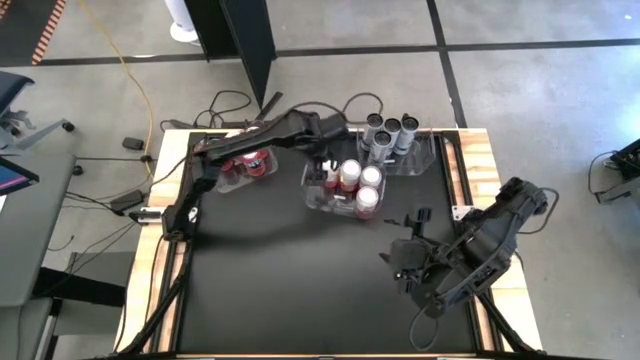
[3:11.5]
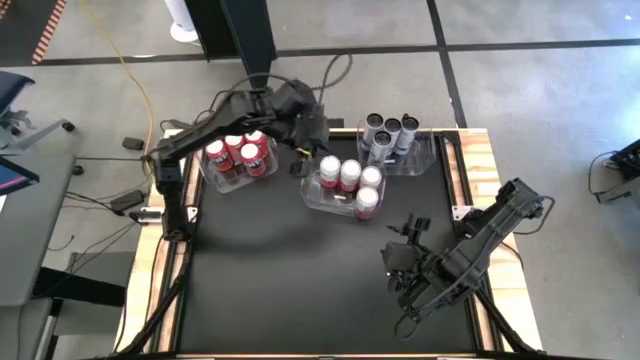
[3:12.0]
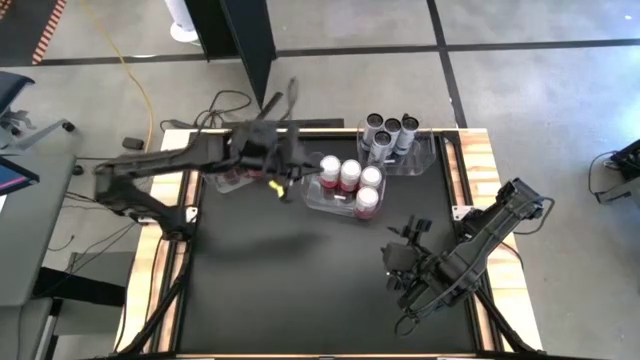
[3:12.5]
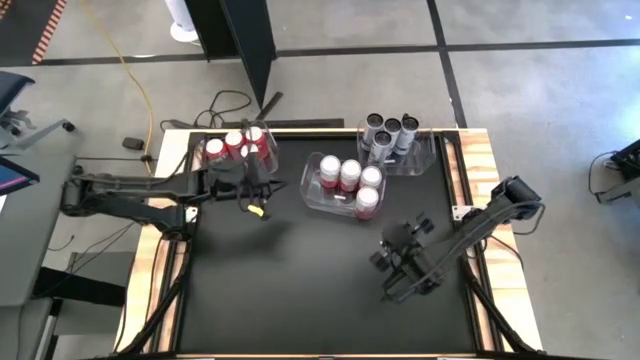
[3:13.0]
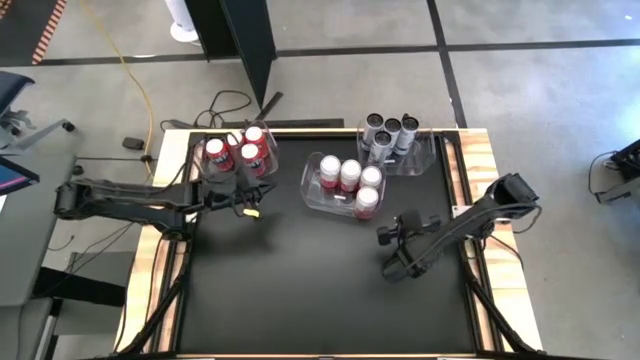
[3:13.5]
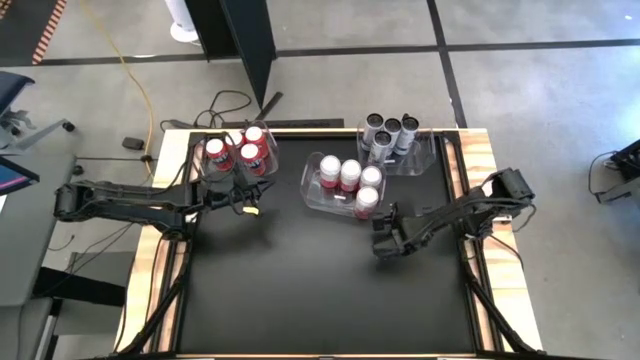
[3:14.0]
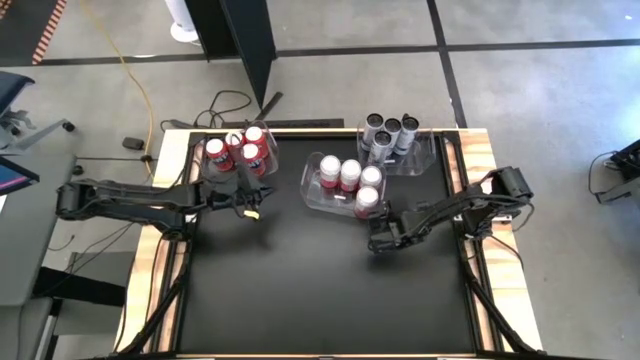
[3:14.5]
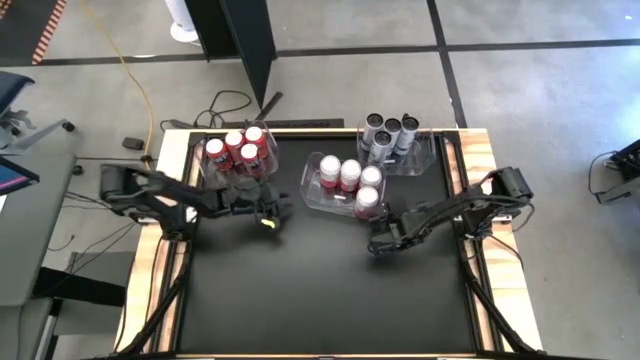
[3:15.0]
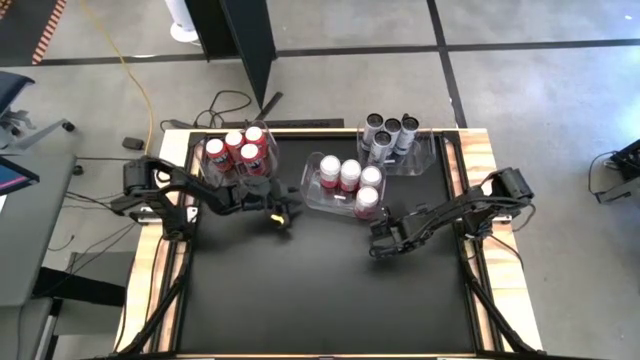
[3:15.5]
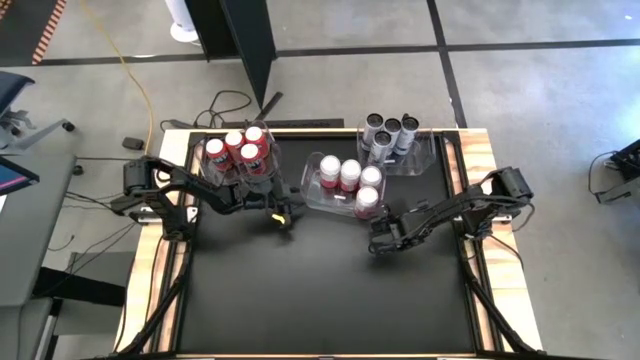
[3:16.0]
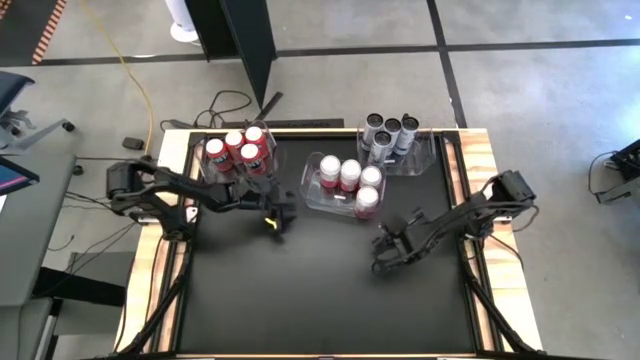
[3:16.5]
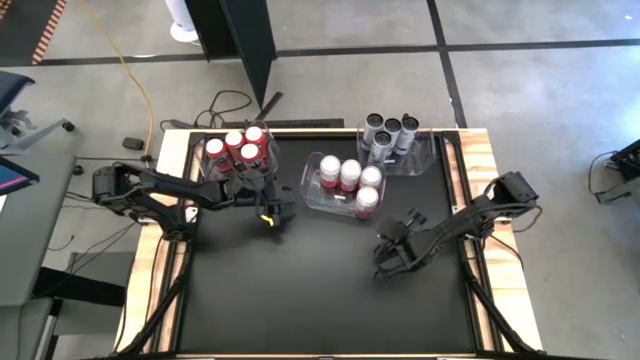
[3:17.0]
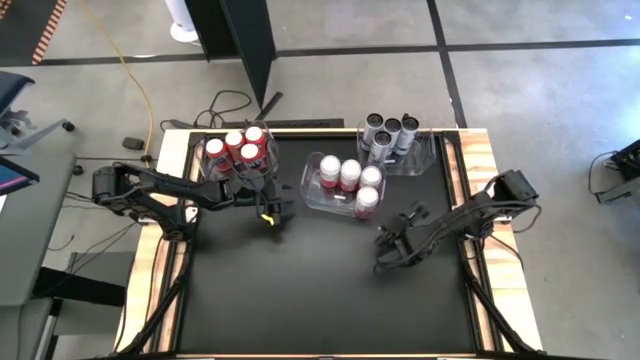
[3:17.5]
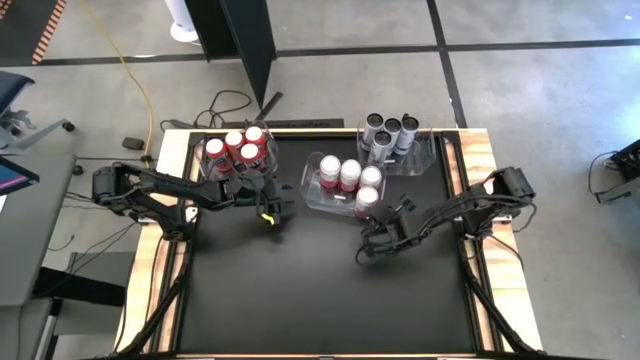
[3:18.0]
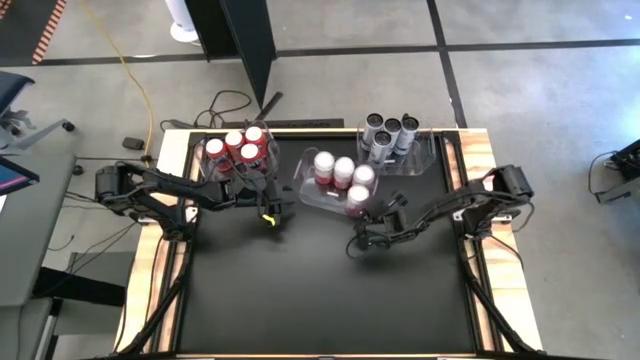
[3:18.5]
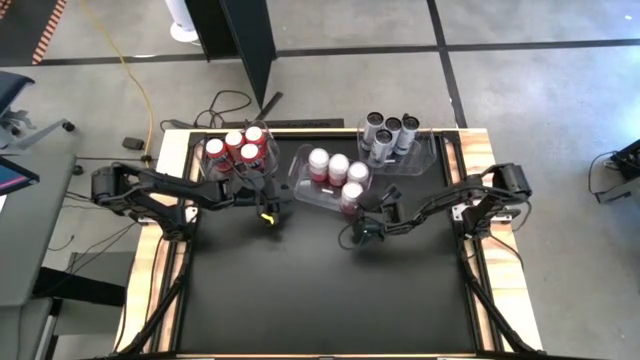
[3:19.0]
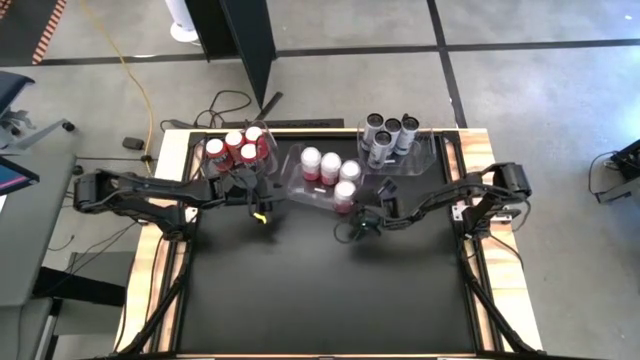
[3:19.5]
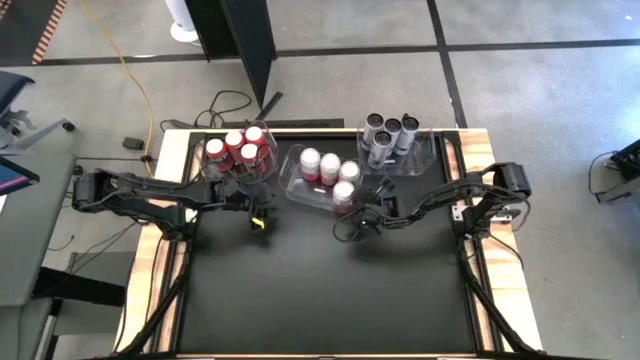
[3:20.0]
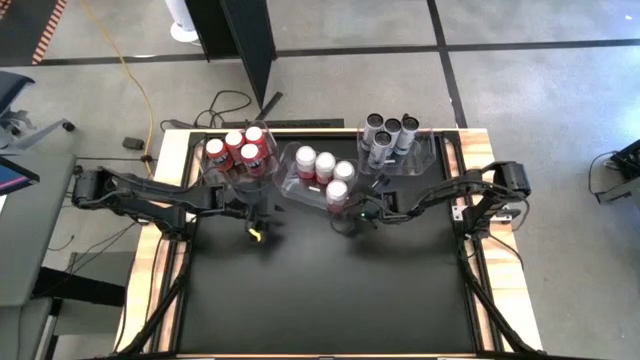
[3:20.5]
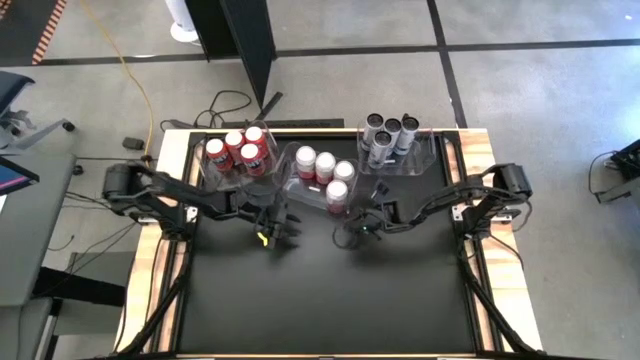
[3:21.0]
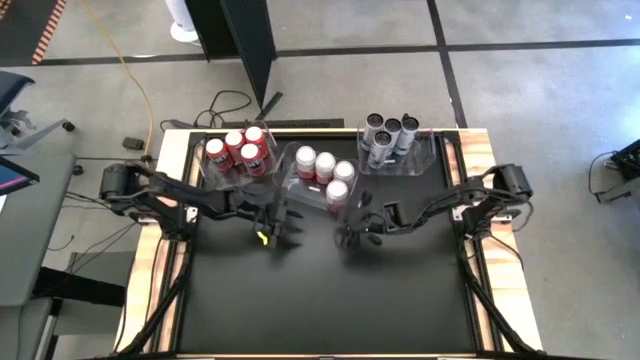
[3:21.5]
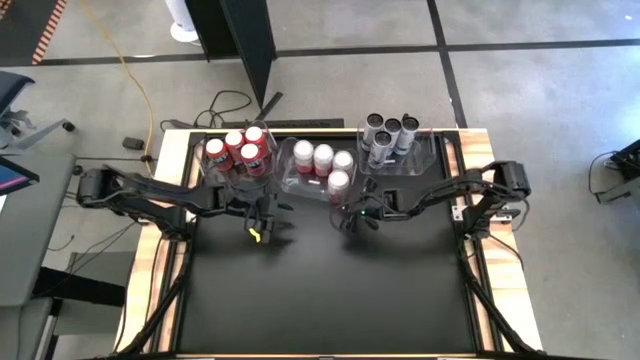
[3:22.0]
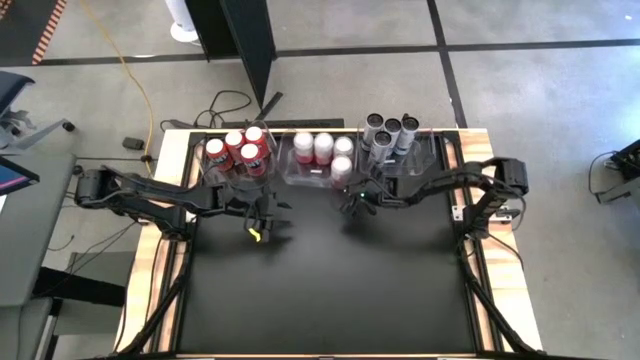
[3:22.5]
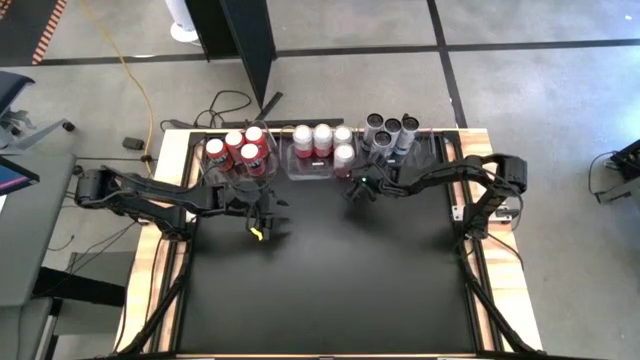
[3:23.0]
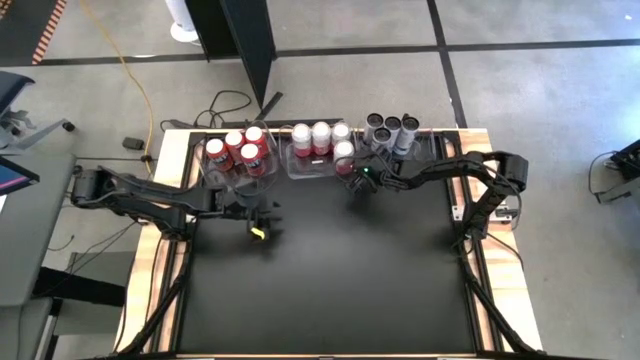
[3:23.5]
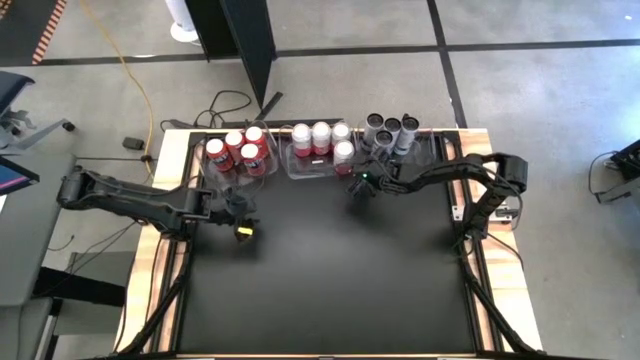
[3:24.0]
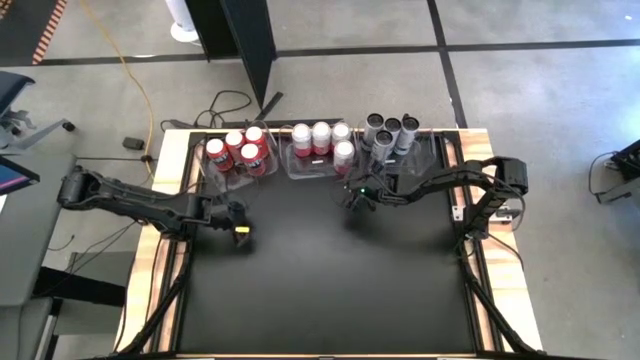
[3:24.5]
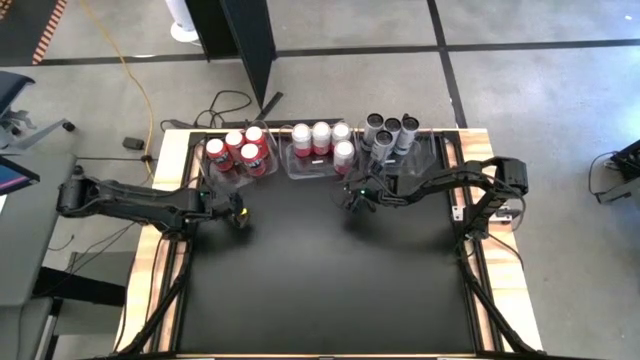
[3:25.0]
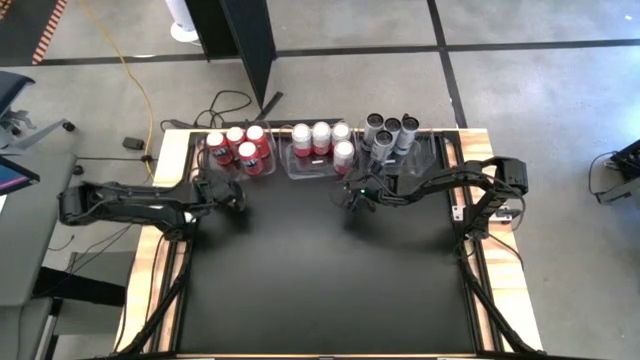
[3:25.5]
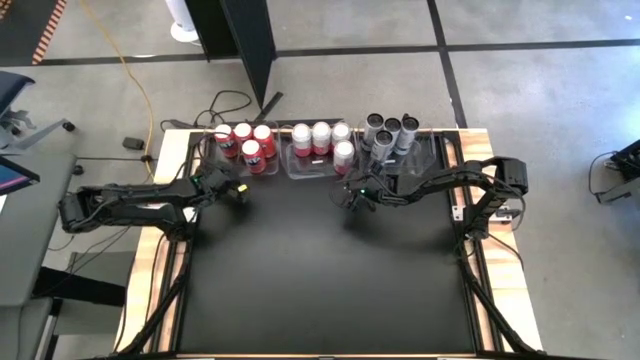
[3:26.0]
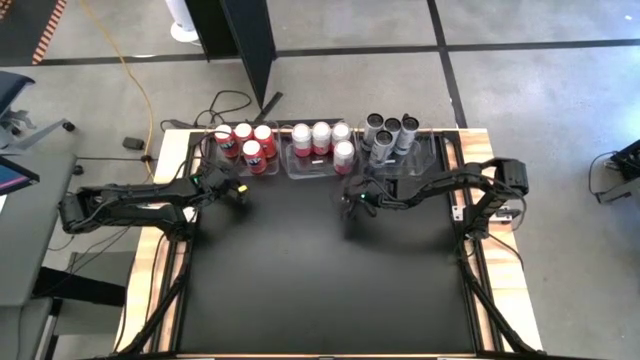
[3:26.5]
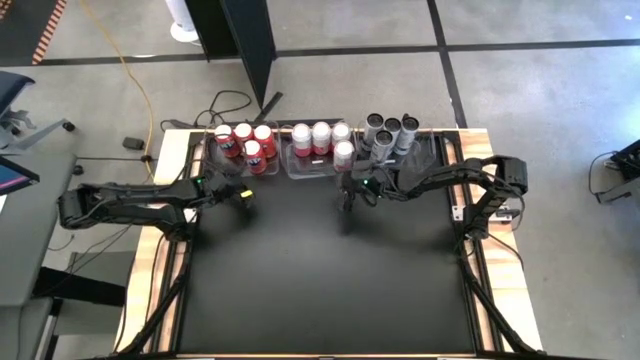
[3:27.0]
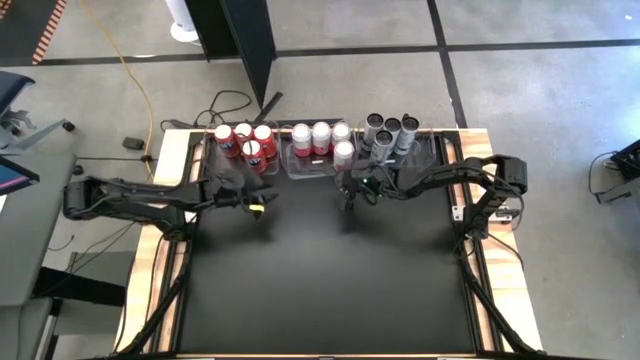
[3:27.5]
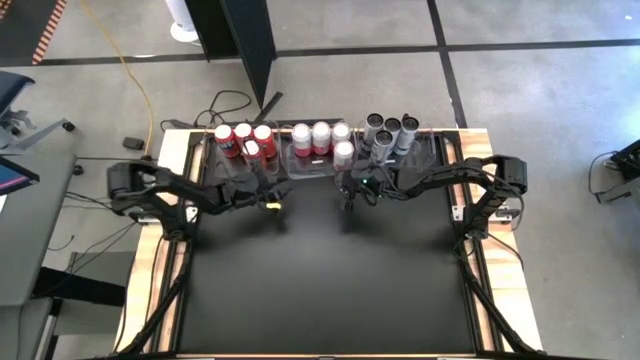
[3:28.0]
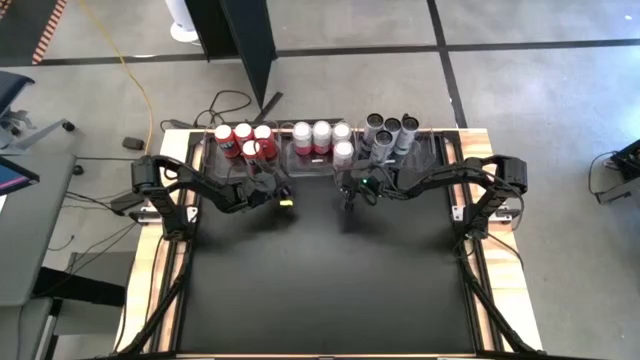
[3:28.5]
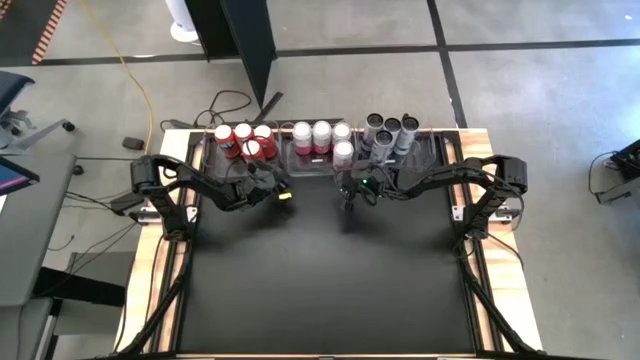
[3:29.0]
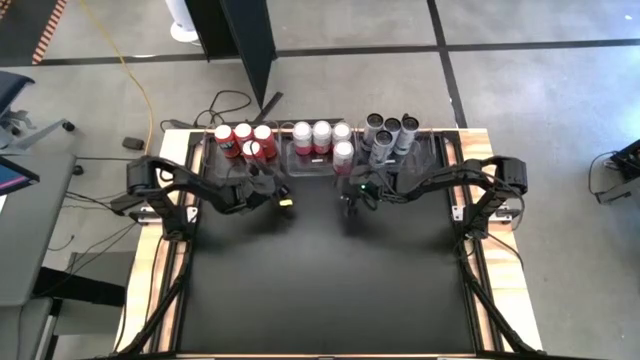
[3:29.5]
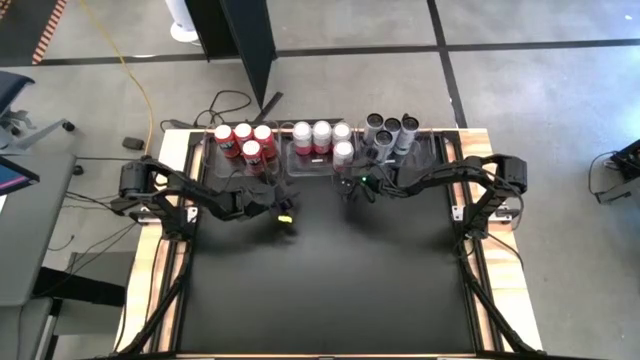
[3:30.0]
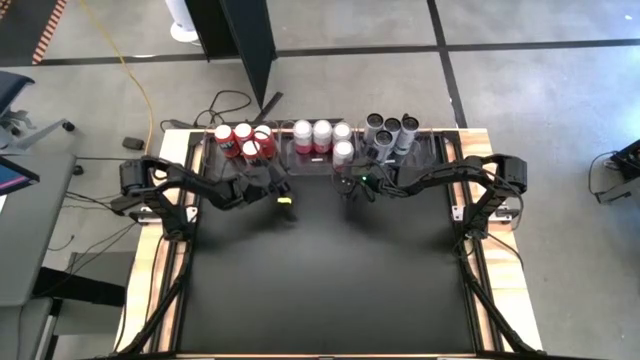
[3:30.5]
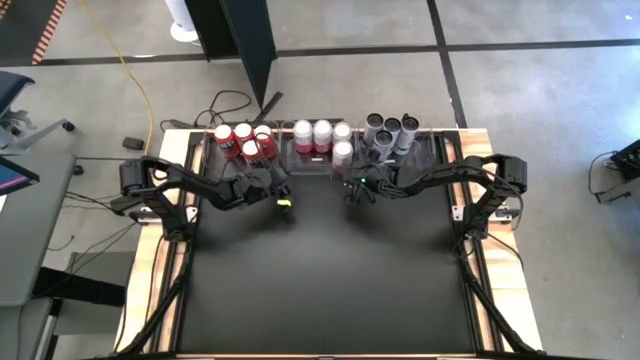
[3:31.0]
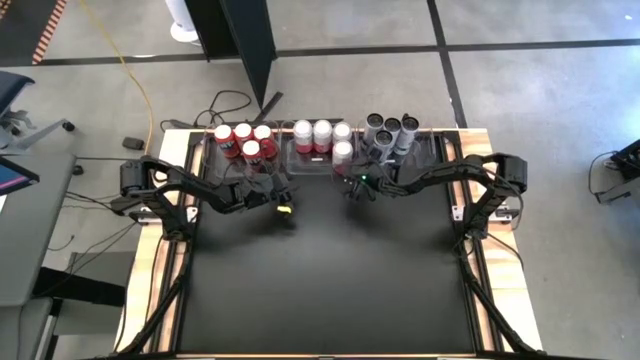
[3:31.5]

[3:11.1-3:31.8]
Task: Sort soda cans
Move the bottom transparent bin between the top transparent bins
